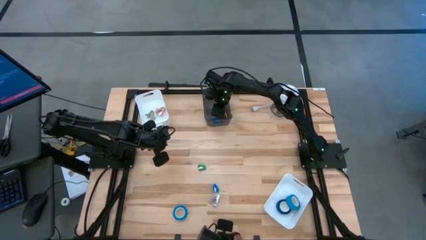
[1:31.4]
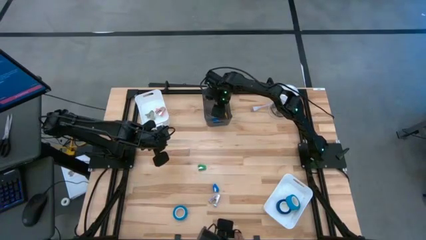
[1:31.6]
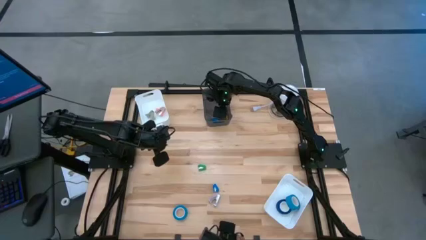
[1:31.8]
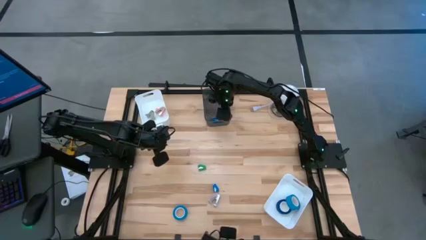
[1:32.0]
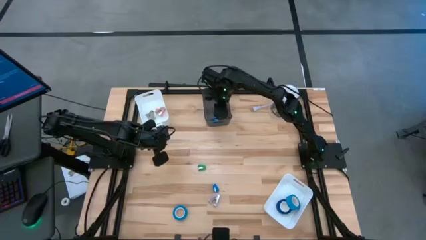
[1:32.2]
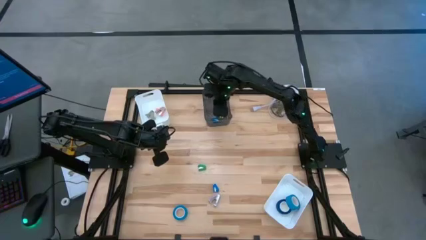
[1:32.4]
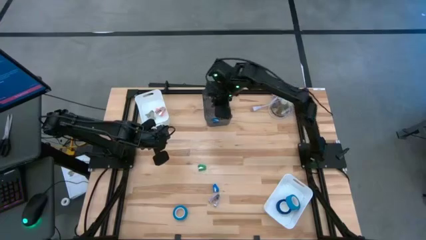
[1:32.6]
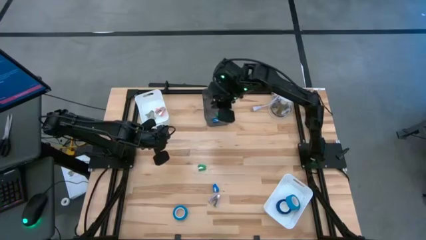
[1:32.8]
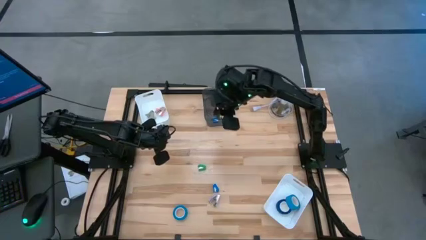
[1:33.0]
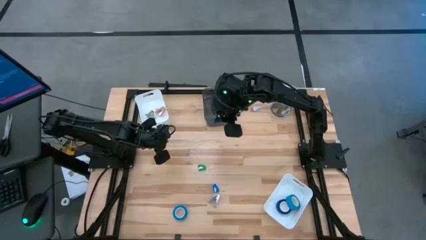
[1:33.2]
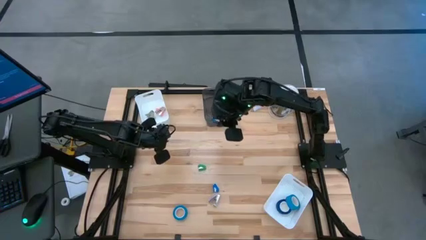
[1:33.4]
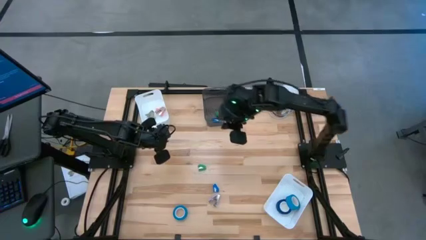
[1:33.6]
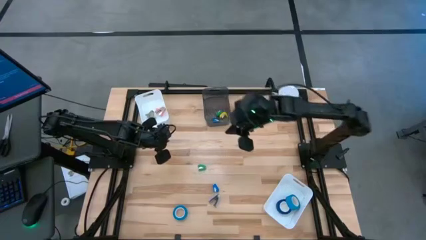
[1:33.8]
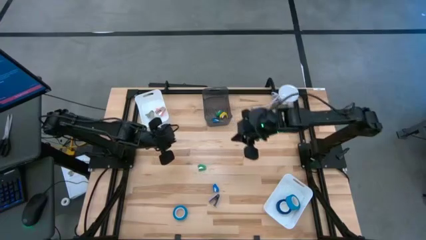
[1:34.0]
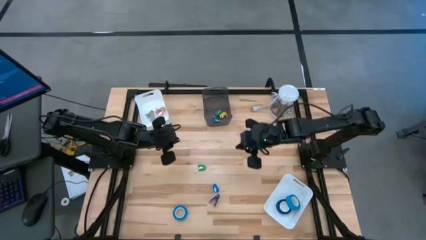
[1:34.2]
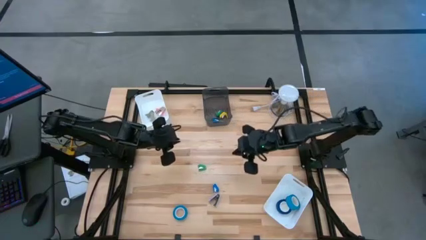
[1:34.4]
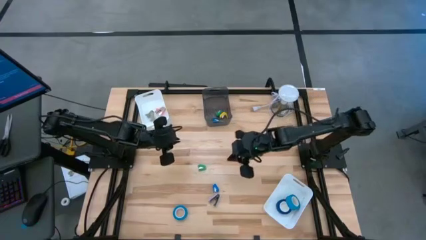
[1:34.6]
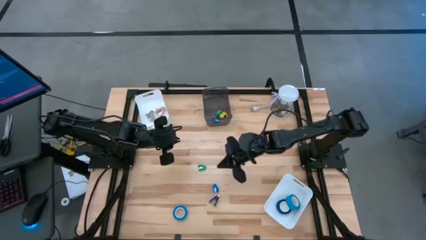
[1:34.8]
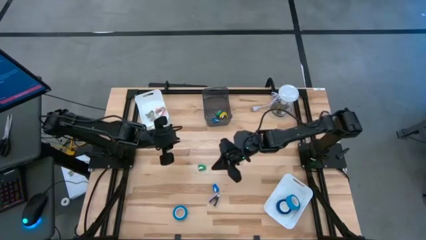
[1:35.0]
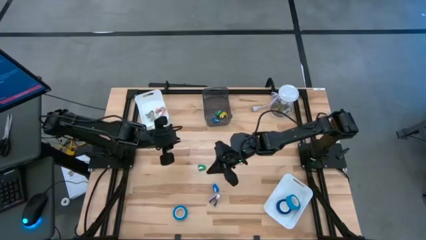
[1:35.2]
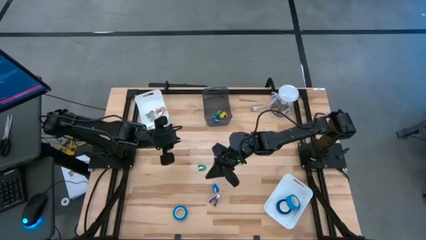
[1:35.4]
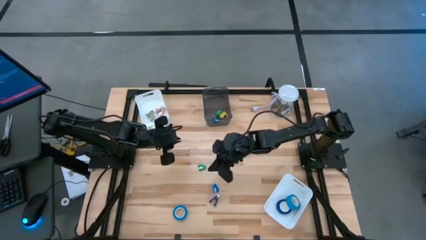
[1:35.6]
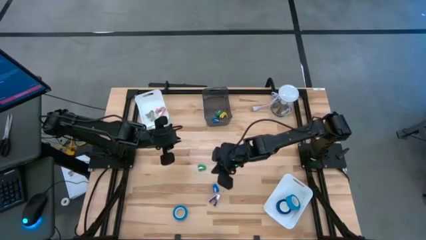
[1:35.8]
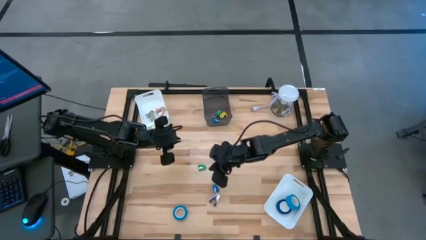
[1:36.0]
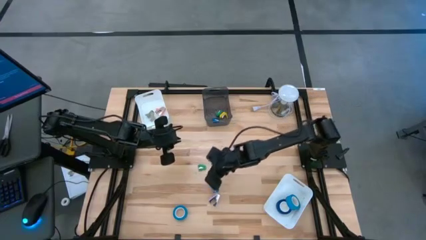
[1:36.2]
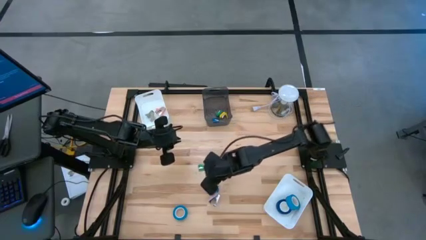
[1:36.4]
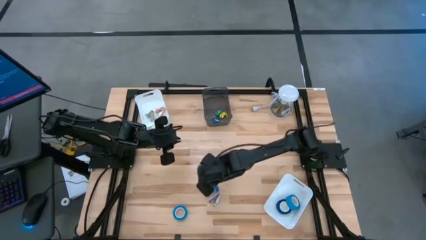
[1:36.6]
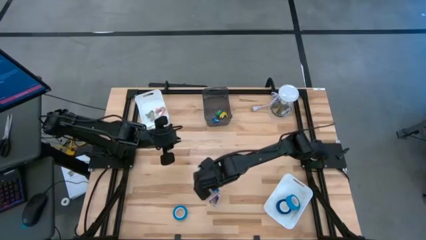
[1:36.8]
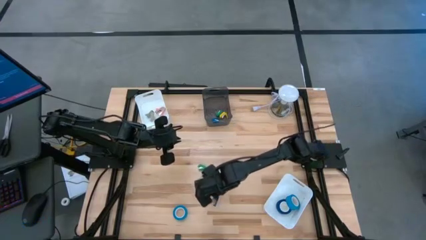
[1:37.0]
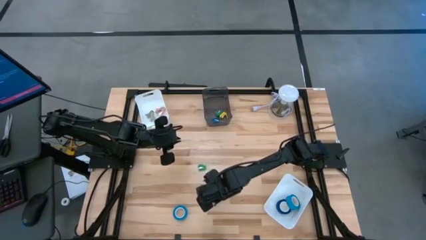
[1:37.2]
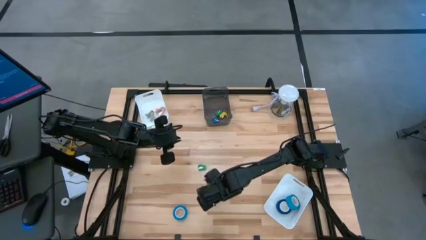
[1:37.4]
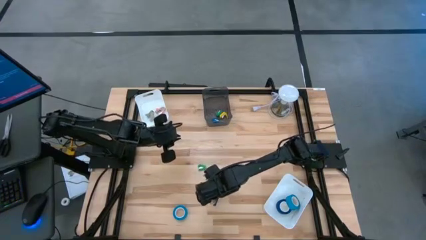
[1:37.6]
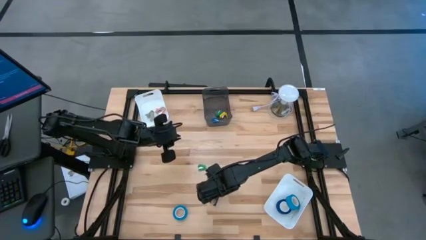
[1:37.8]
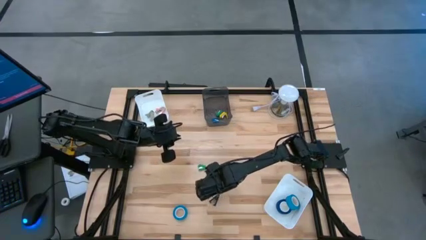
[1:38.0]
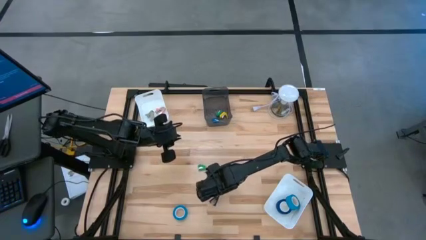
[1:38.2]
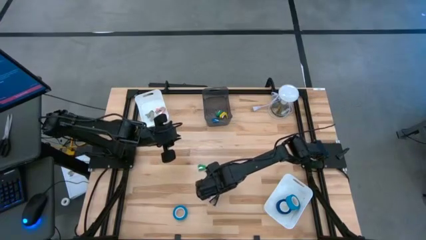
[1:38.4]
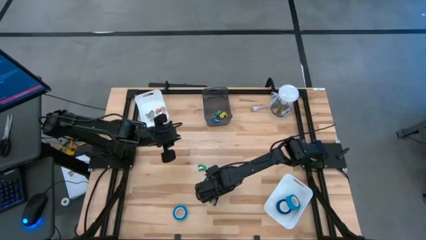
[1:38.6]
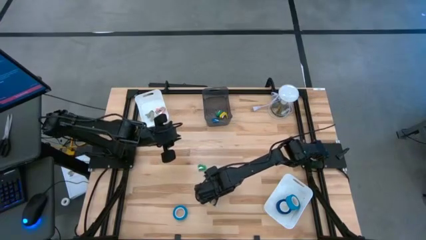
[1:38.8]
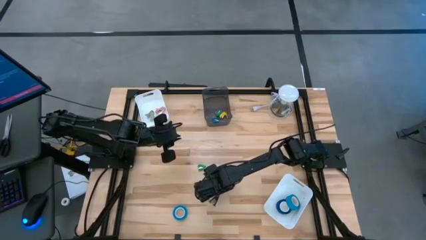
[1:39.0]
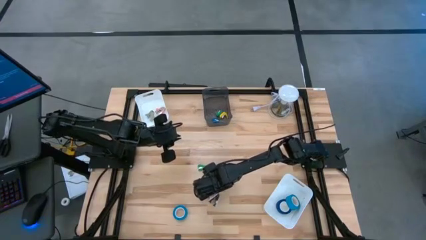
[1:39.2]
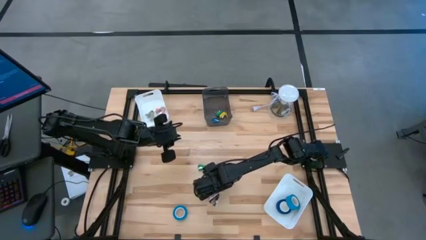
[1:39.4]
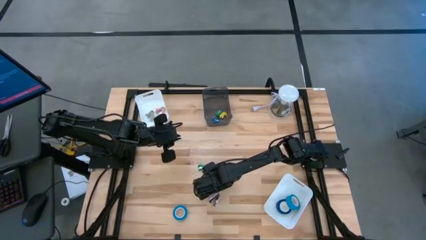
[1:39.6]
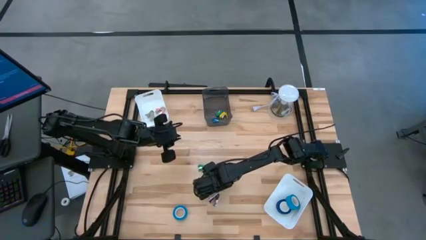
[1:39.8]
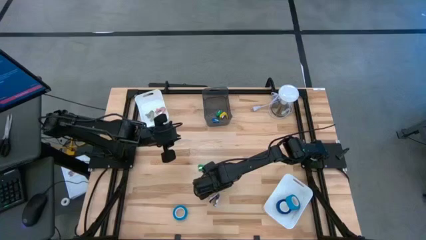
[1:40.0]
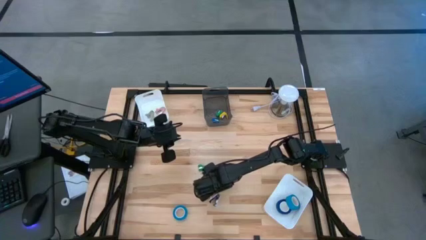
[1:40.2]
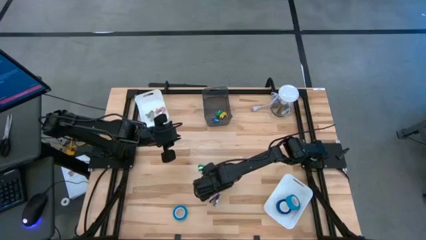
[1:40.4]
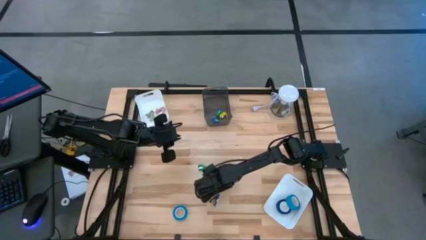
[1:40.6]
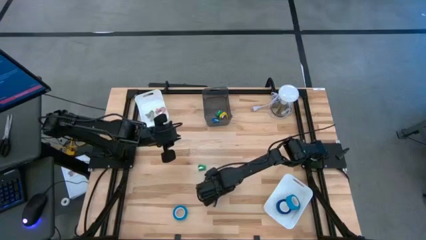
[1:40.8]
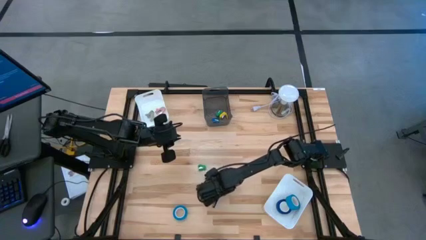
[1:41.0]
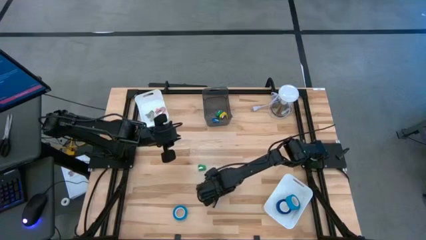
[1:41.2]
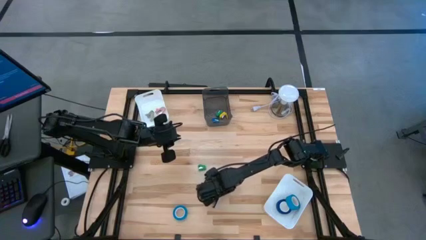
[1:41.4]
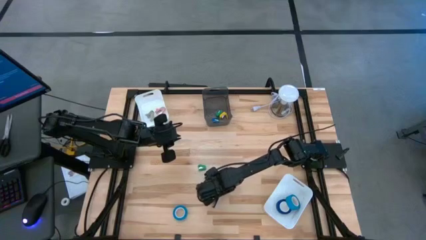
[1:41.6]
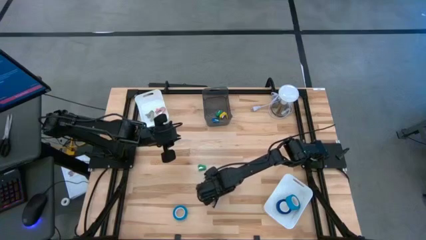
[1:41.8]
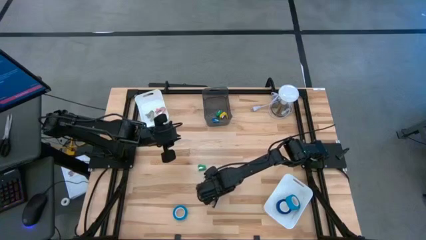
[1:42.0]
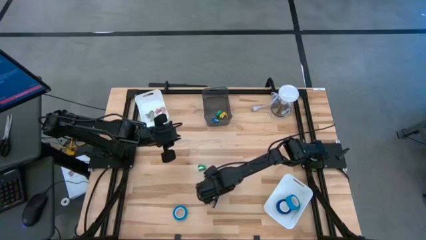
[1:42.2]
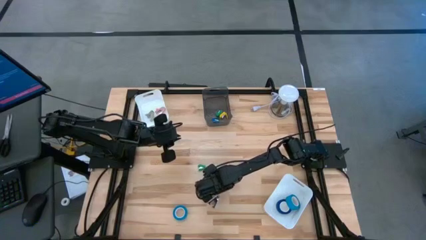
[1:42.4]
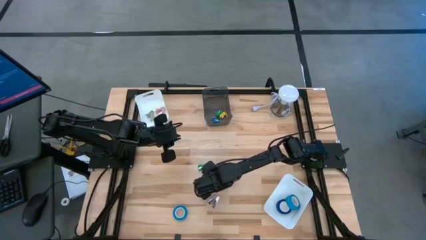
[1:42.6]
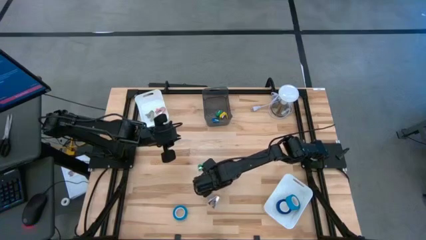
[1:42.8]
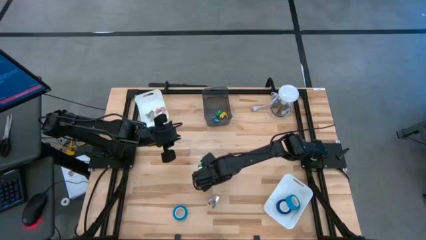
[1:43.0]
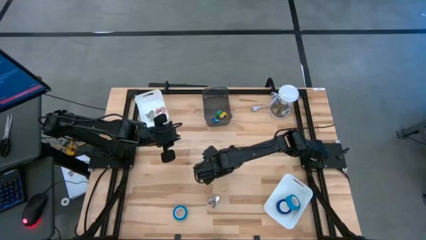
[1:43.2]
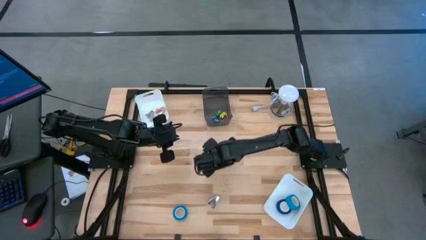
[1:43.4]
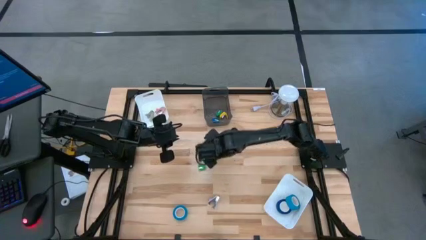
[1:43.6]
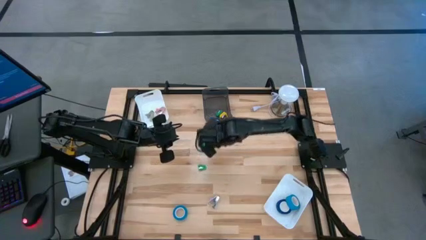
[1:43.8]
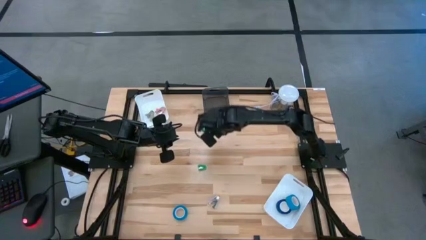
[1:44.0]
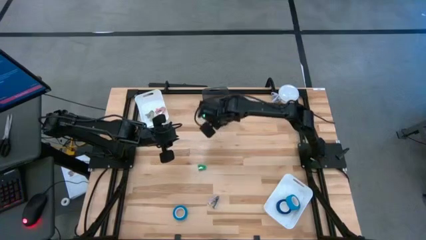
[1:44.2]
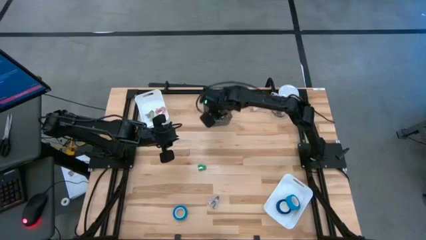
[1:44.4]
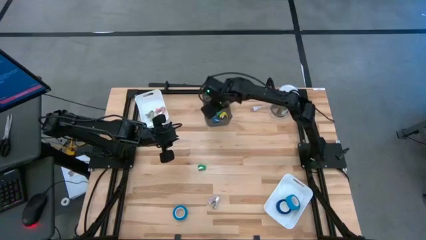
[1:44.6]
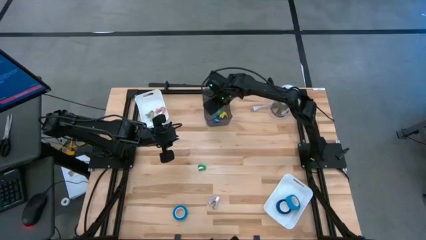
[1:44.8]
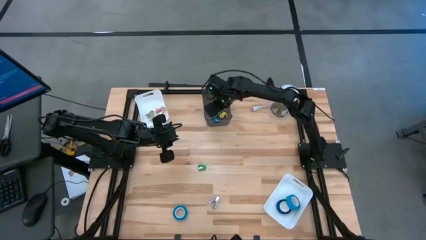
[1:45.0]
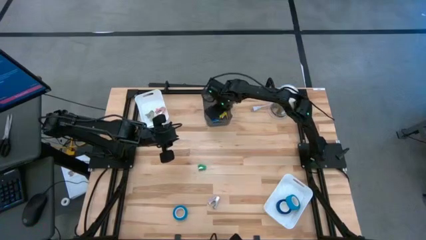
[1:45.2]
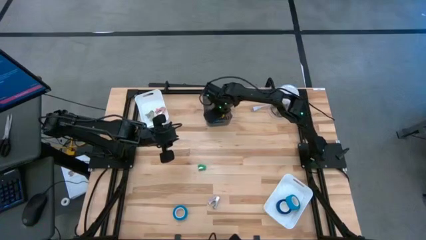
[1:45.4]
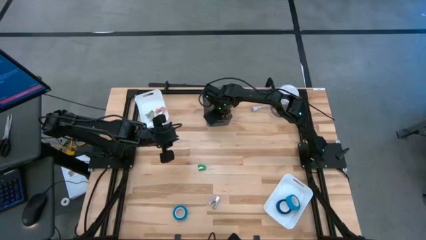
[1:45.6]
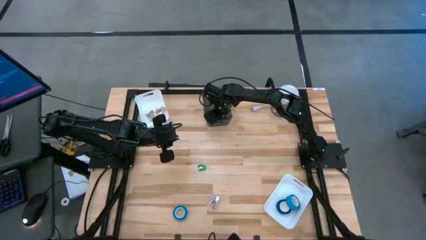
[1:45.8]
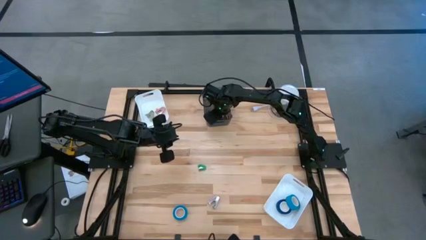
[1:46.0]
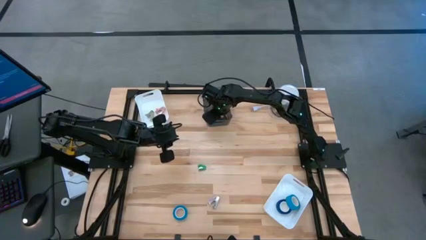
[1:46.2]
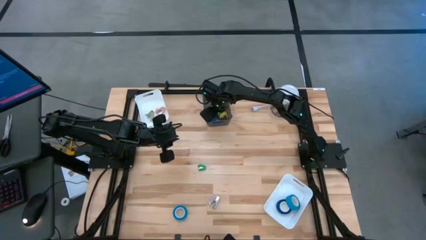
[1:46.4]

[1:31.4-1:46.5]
Task: Pick and place Stapler, Stapler remover, tape
Put the blue stapler into the black bin

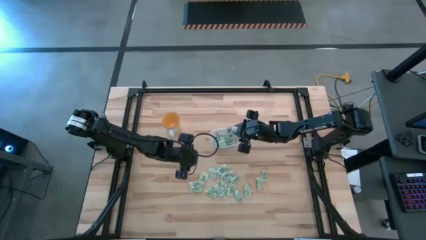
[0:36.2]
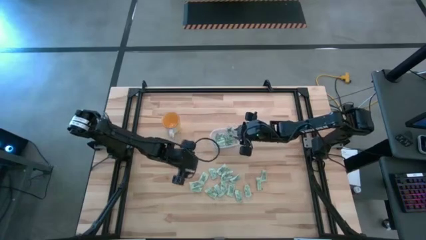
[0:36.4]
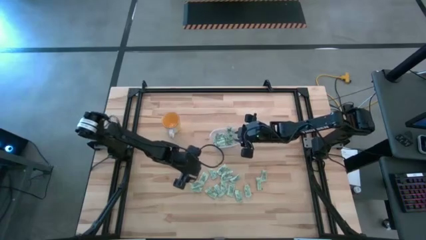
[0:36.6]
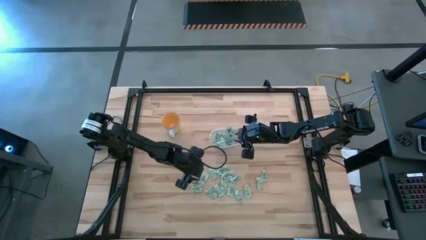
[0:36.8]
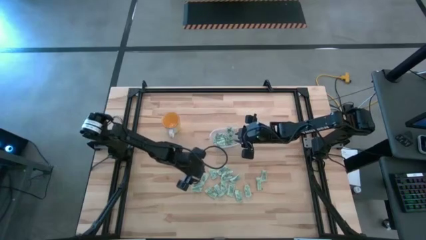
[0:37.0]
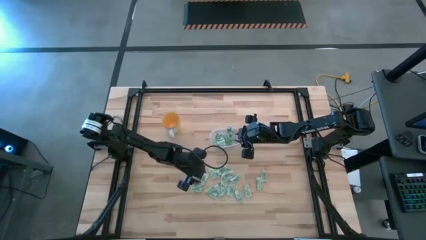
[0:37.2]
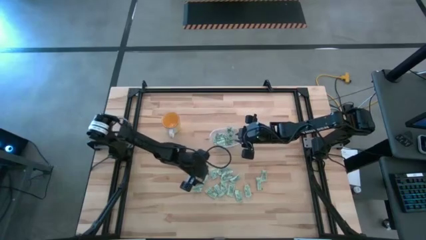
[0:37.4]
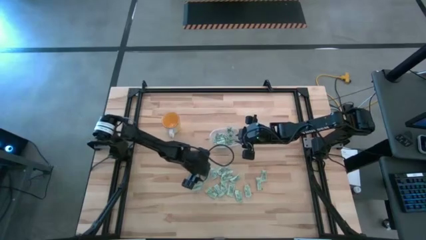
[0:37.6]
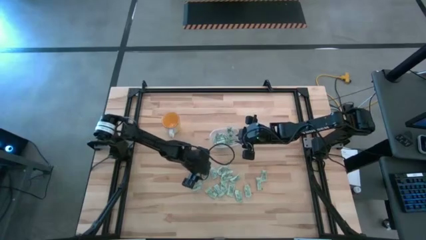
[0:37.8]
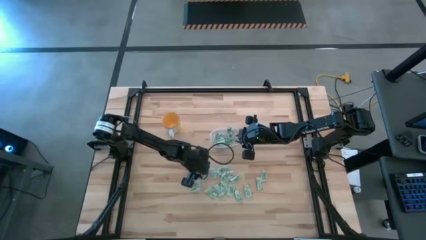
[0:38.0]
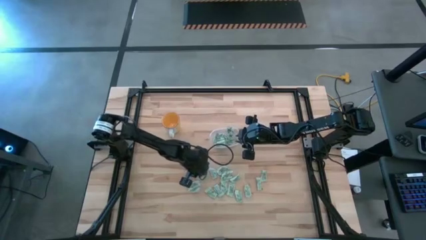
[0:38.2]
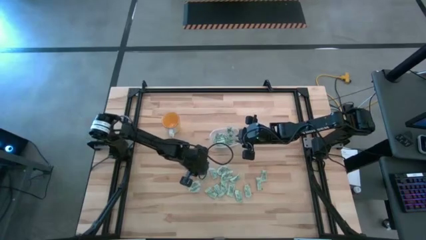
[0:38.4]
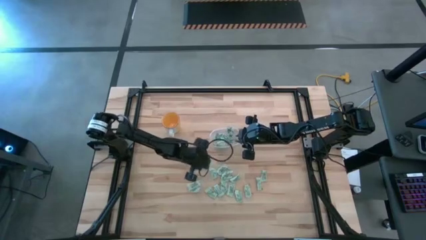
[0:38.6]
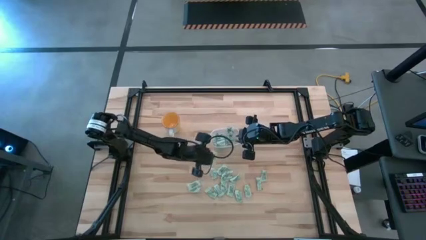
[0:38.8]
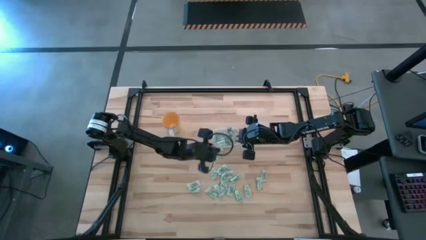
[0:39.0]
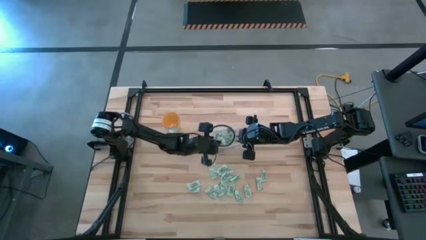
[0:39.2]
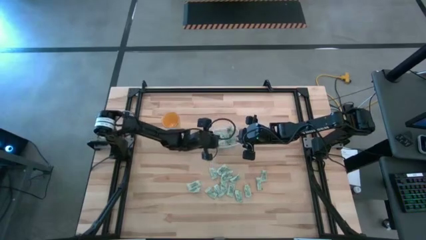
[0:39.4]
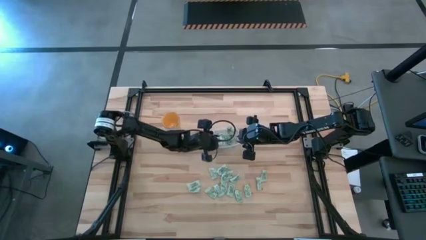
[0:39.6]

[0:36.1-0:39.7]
Task: Pick and place Stevia / Truvia into bins
Put the stevia packet into the transparent bin
